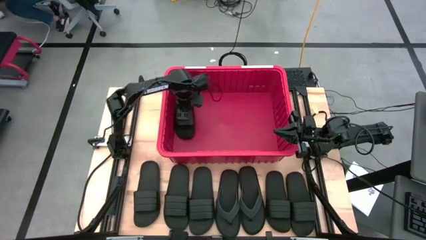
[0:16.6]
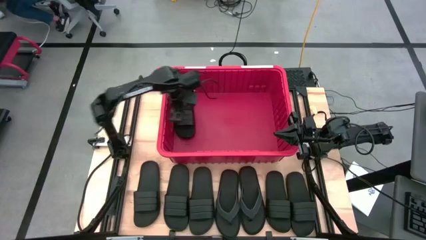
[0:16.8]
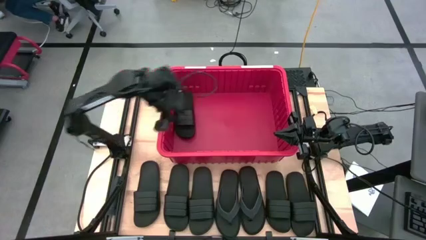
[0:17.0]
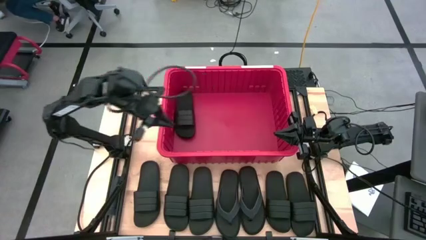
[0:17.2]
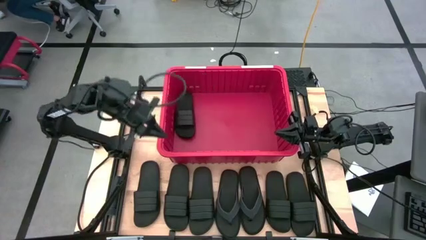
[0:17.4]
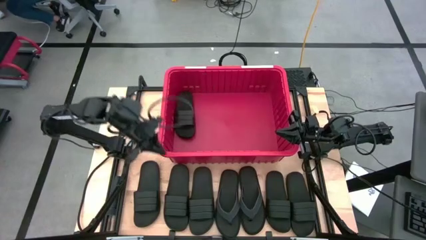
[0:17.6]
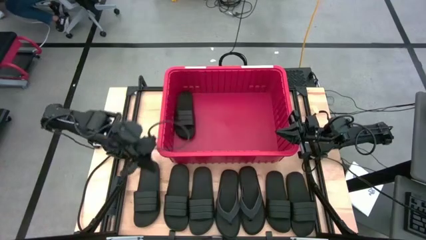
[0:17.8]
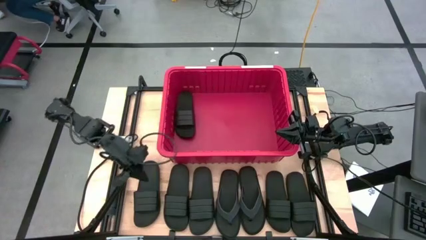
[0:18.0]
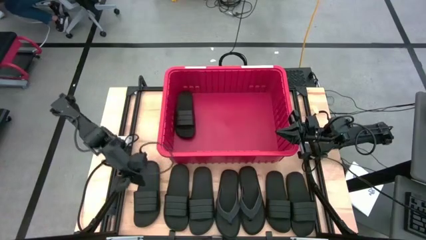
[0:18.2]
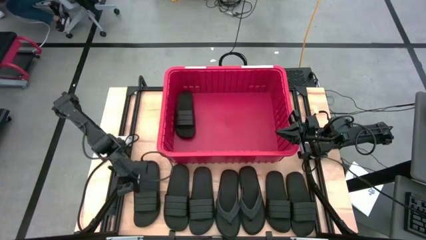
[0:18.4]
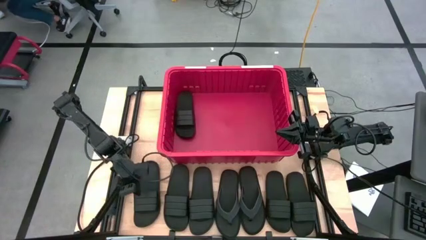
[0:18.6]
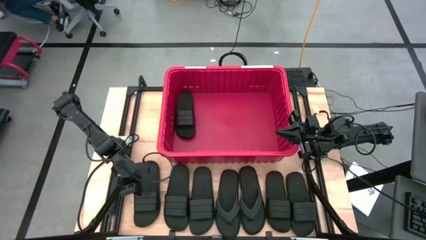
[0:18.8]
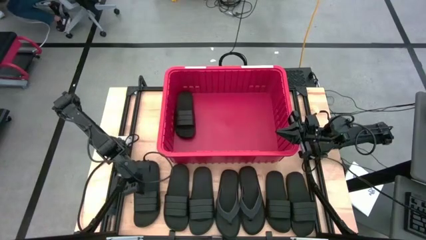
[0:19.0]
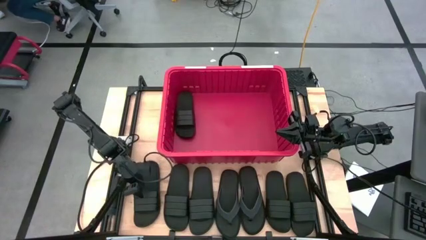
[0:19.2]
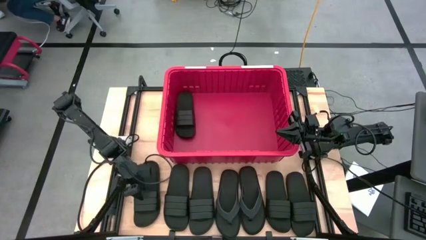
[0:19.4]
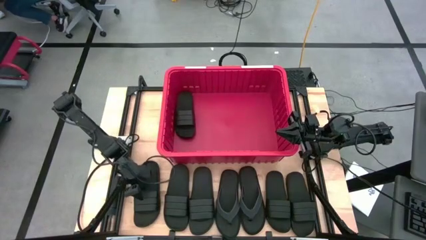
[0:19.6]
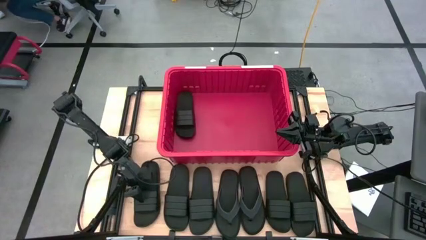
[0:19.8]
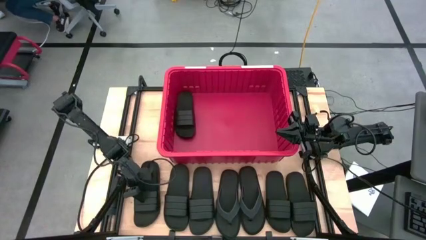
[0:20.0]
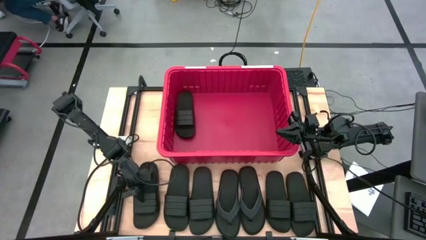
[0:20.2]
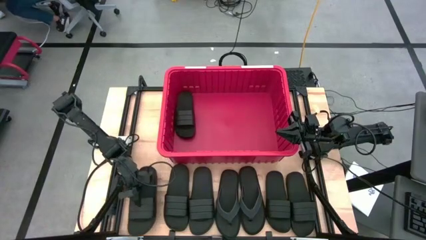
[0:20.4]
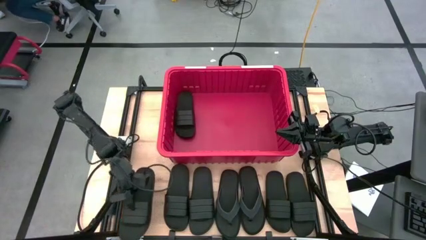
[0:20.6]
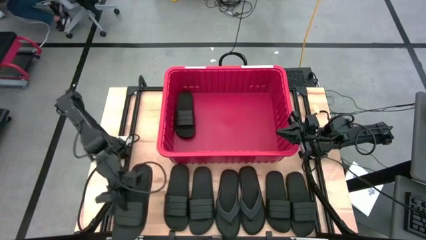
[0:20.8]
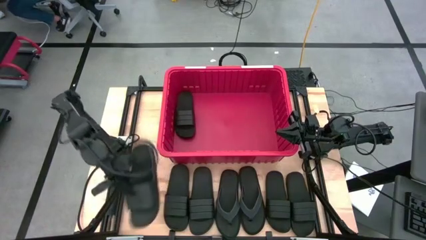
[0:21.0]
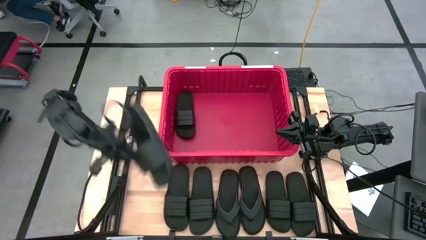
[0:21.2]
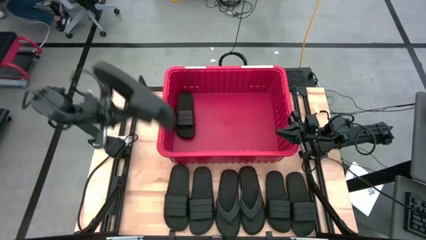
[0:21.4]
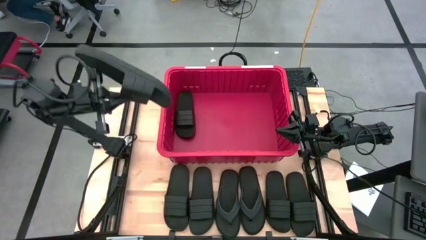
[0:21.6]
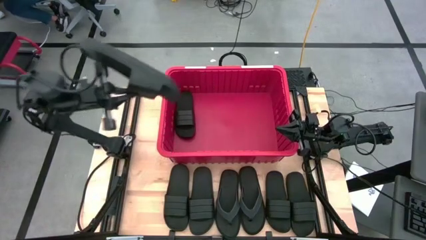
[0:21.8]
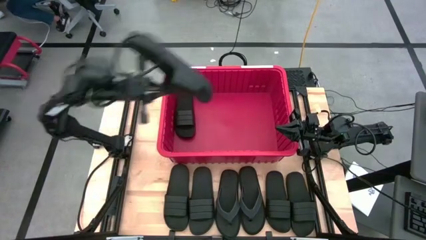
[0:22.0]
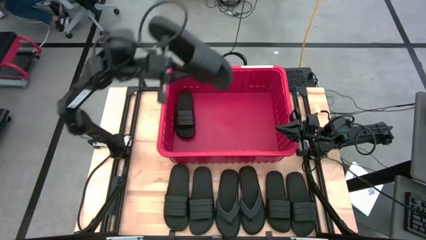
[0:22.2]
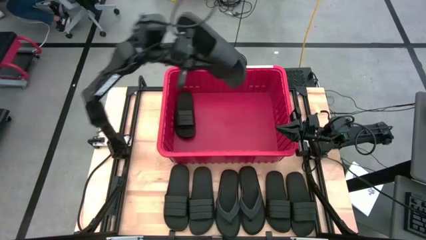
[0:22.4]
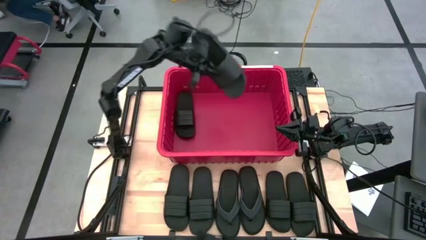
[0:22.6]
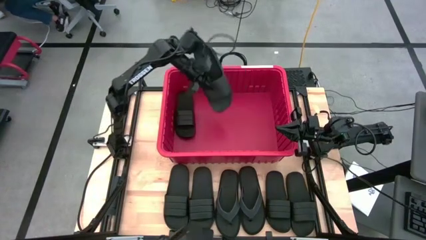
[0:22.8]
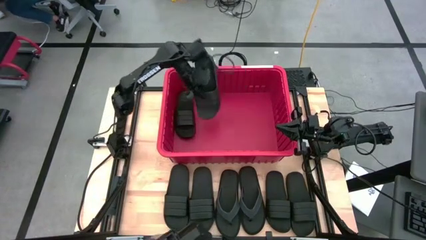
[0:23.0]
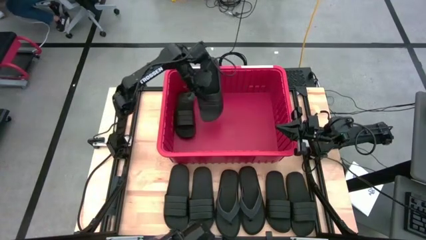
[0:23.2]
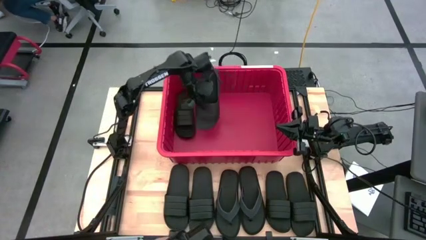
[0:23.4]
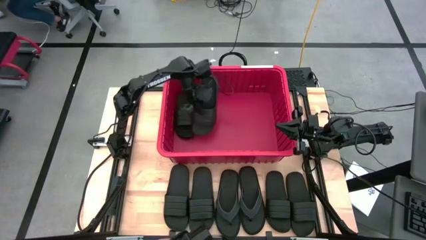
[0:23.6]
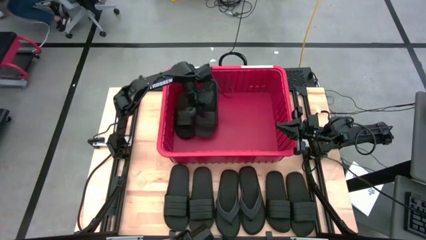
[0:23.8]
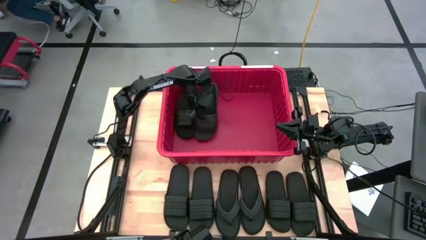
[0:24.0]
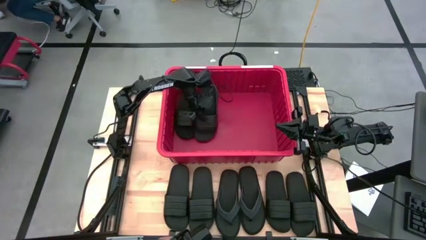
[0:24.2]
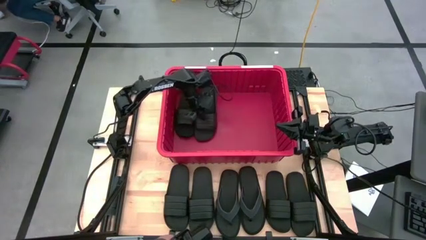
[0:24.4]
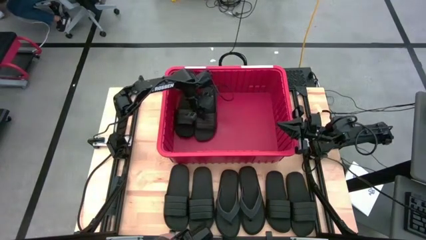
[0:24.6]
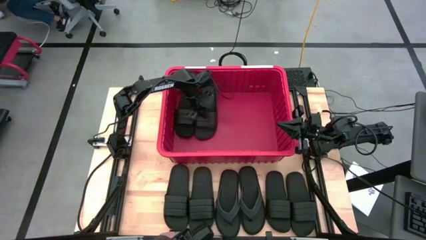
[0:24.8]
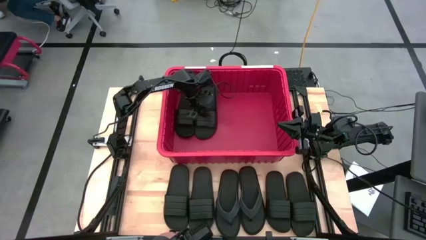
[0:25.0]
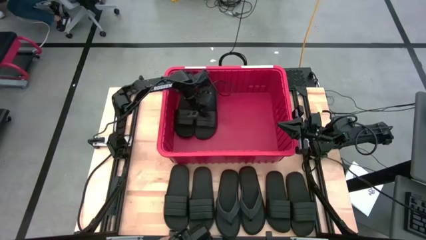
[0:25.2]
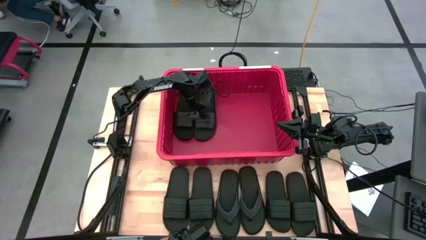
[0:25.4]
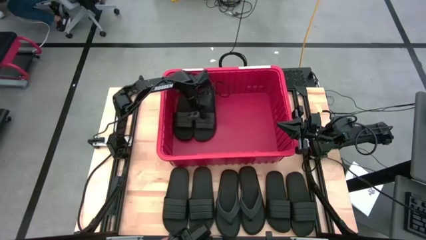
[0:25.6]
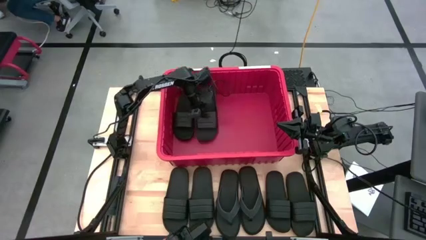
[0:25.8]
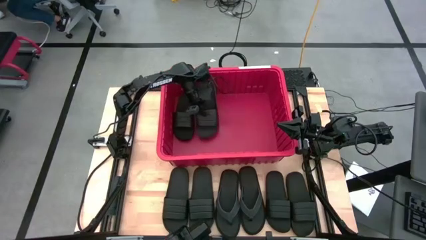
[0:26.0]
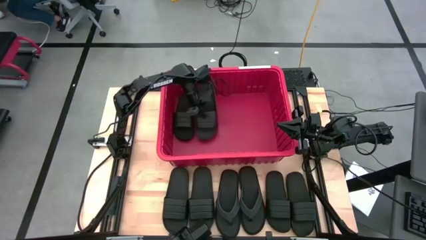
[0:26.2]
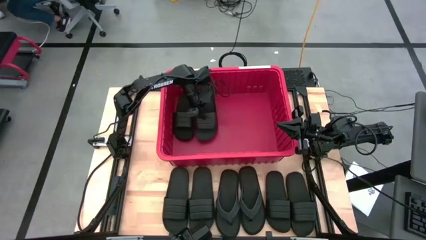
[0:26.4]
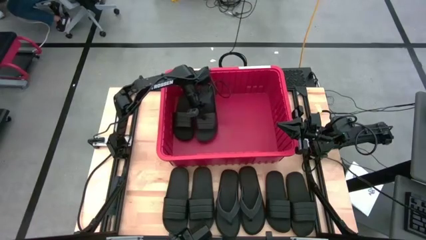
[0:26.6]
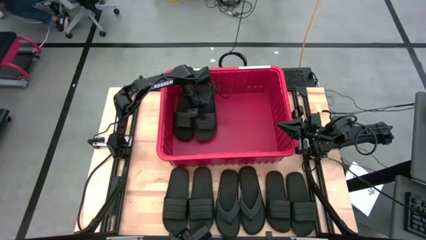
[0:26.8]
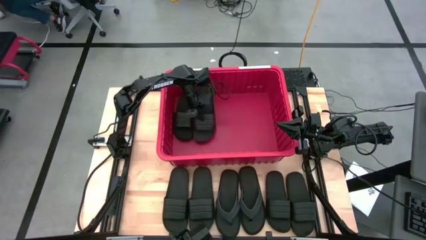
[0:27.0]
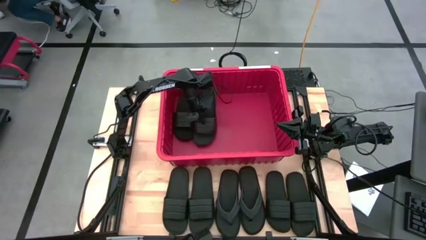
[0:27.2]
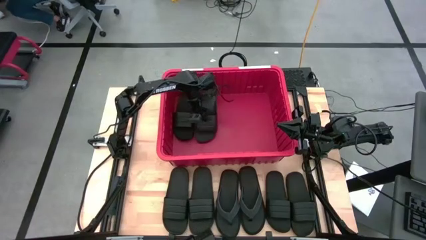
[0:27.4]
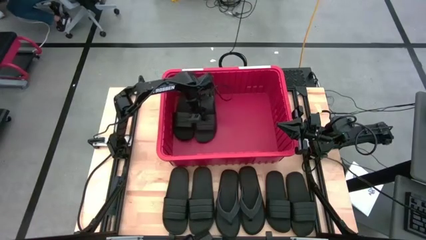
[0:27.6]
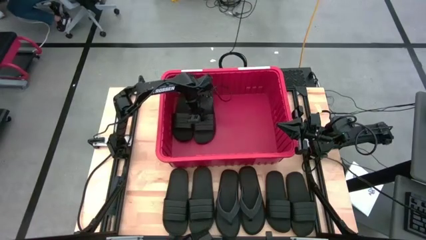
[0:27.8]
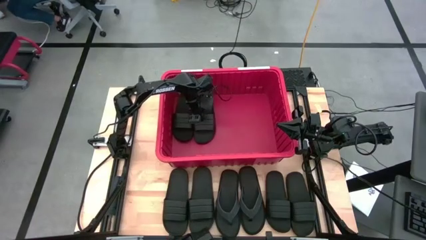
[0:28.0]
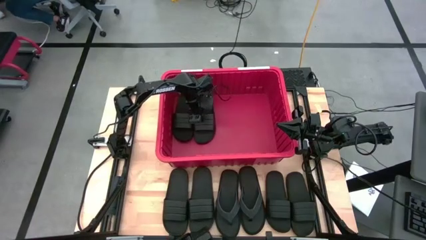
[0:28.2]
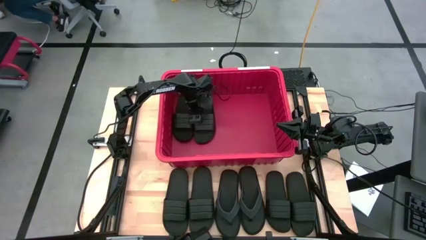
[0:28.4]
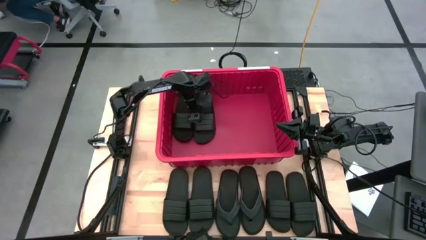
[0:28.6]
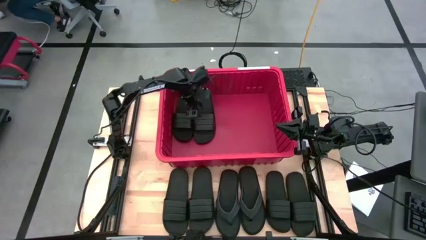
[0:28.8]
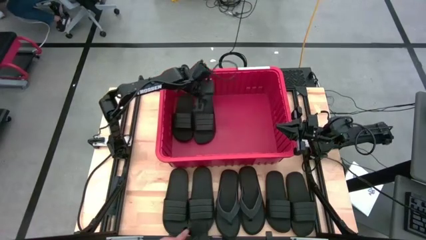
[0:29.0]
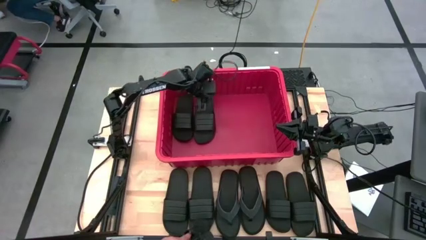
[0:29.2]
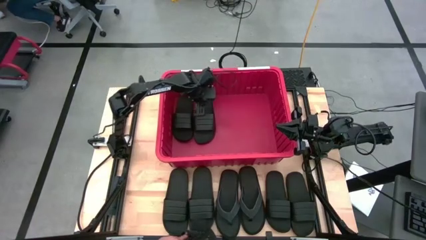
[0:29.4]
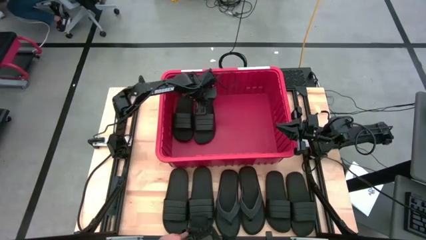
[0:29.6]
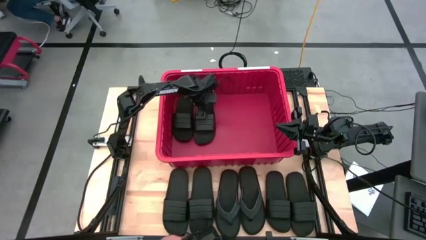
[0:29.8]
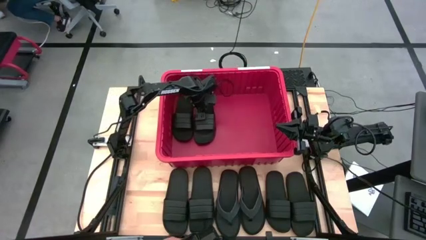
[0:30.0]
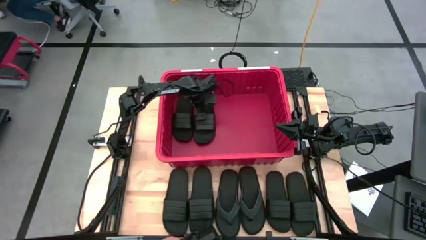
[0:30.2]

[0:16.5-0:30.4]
Task: Pick and place slides into bin
Put the black slides into the red bin
